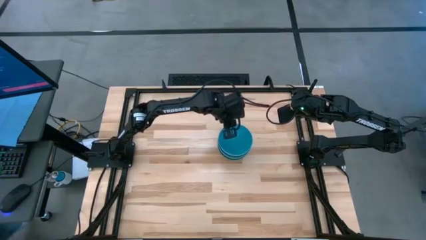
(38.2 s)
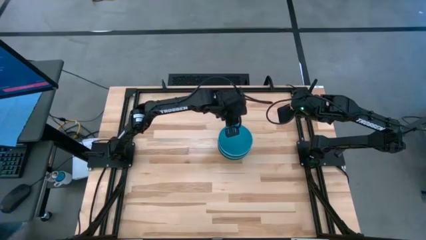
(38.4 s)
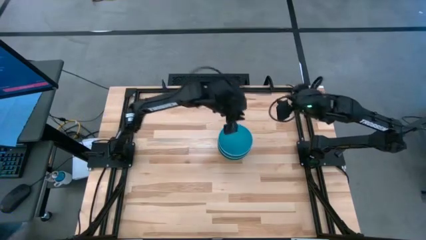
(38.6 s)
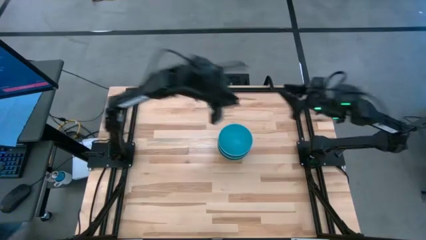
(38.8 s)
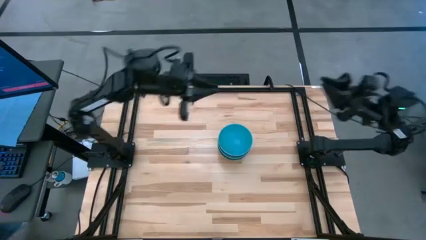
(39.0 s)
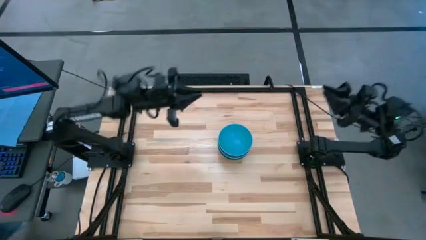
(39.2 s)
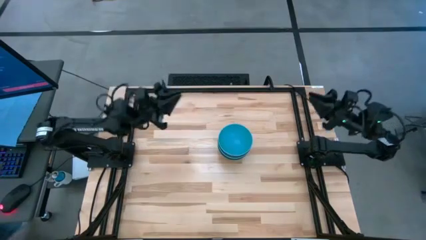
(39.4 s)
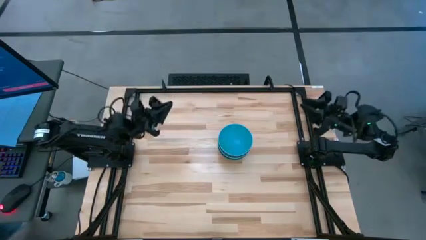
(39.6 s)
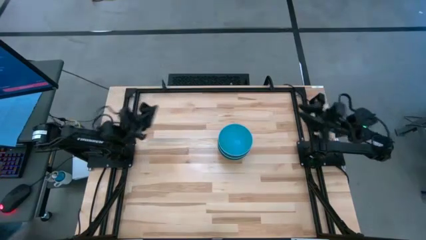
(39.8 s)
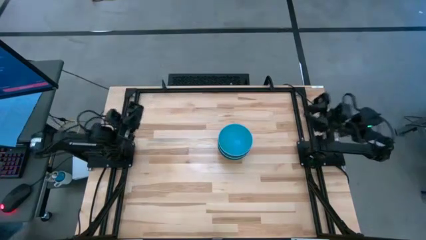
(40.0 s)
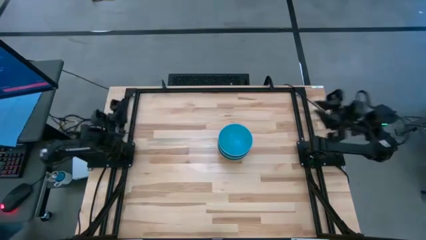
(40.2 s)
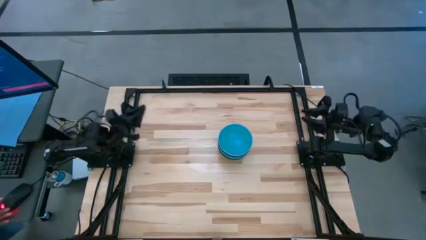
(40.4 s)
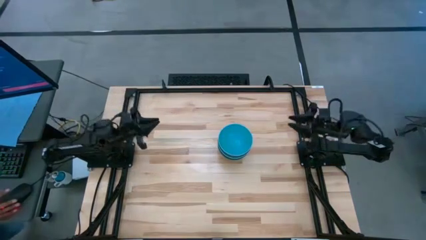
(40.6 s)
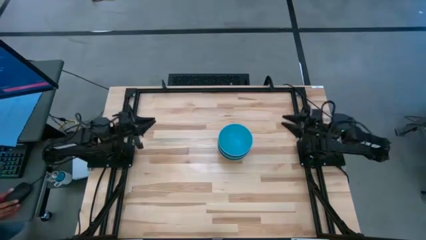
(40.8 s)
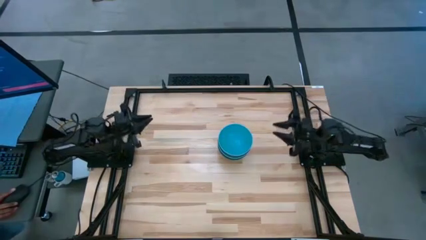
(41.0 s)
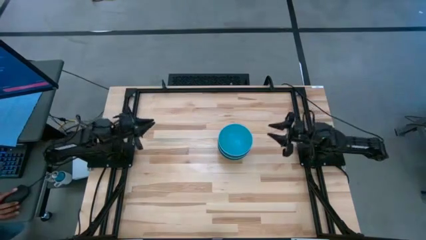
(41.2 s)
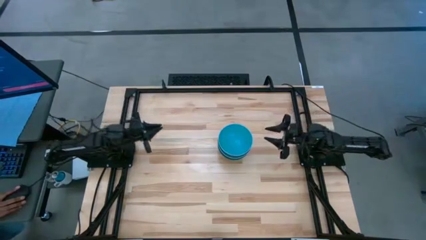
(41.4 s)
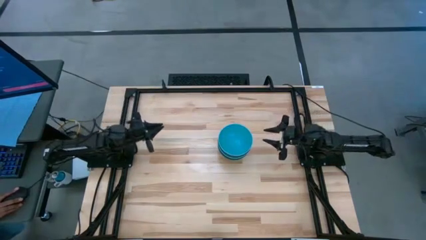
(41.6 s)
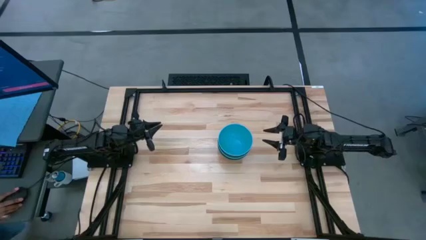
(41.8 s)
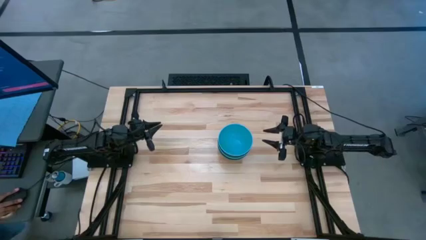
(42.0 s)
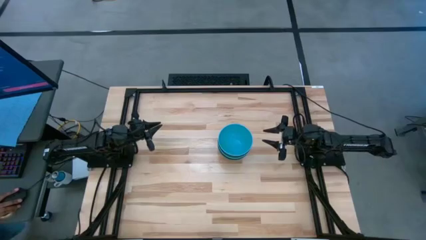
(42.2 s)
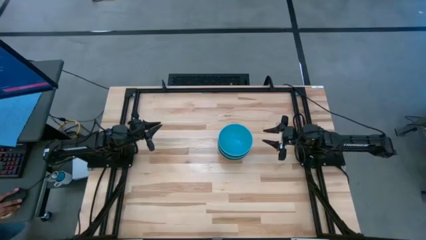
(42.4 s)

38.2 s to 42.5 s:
Task: Nest bowls inside each other
Return to Home Position

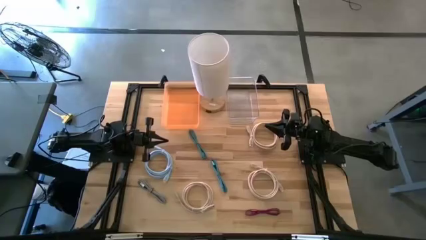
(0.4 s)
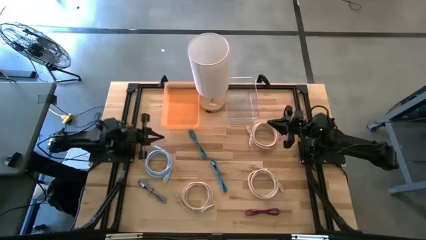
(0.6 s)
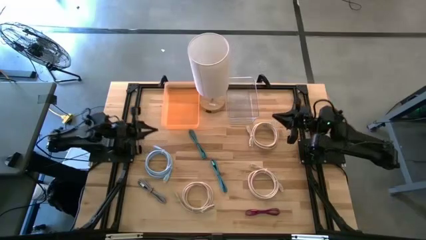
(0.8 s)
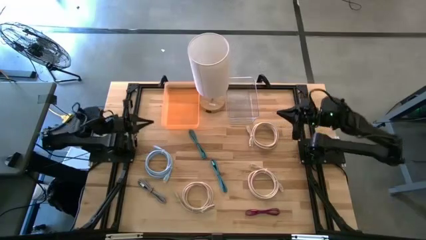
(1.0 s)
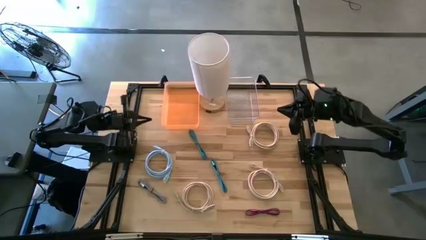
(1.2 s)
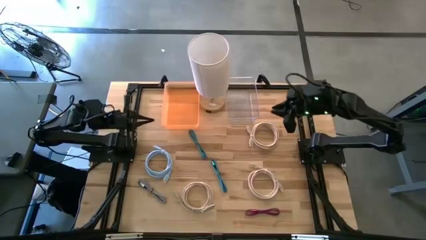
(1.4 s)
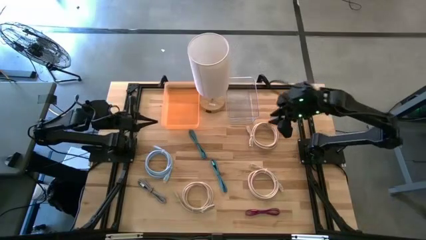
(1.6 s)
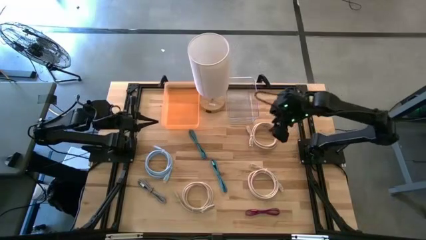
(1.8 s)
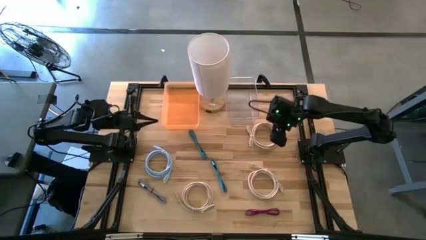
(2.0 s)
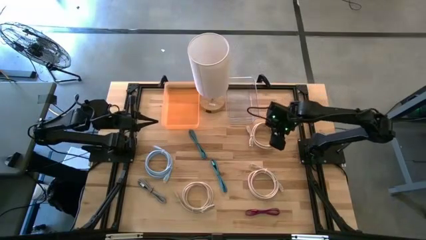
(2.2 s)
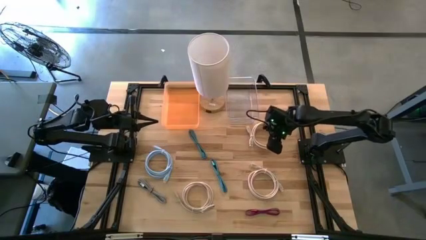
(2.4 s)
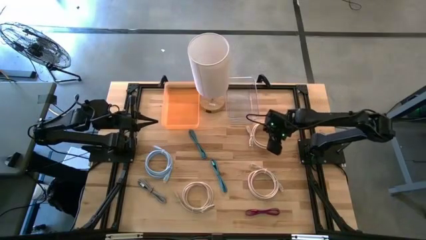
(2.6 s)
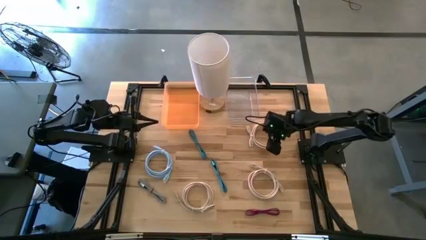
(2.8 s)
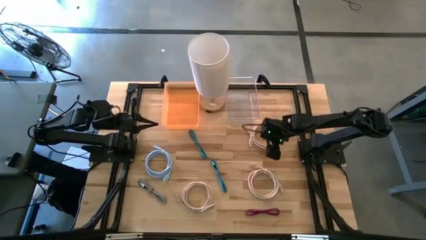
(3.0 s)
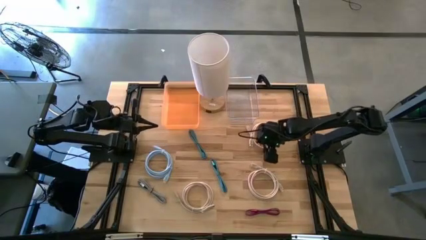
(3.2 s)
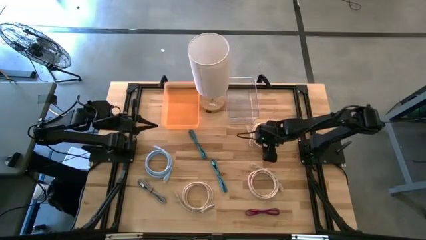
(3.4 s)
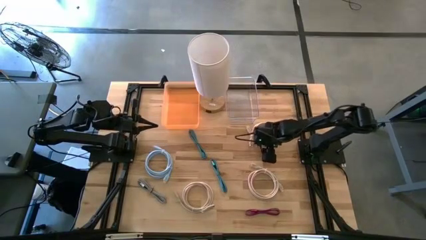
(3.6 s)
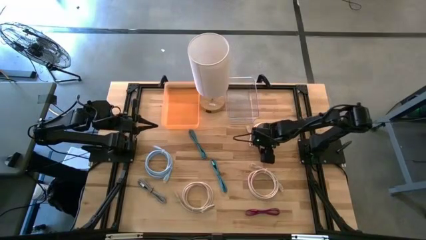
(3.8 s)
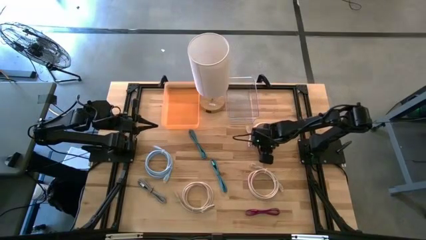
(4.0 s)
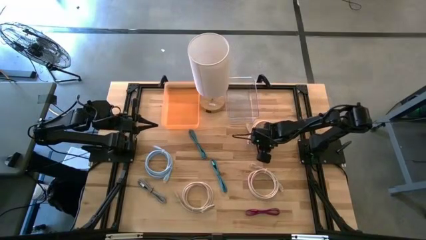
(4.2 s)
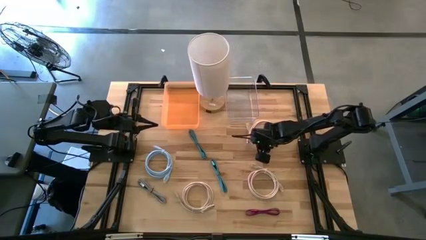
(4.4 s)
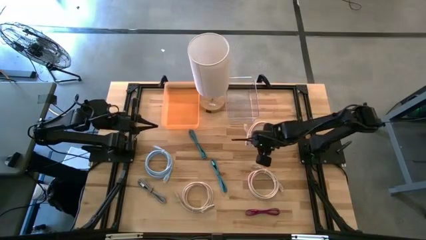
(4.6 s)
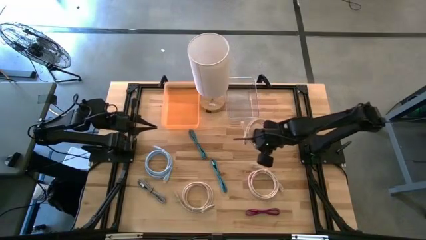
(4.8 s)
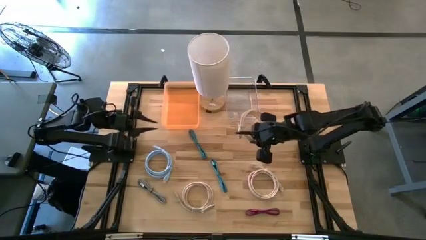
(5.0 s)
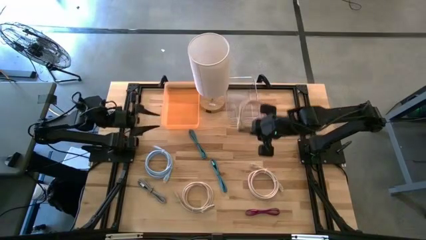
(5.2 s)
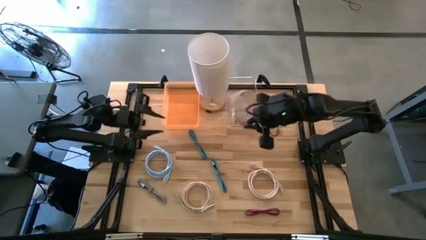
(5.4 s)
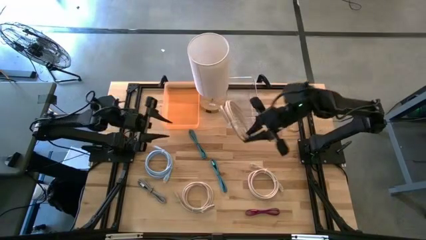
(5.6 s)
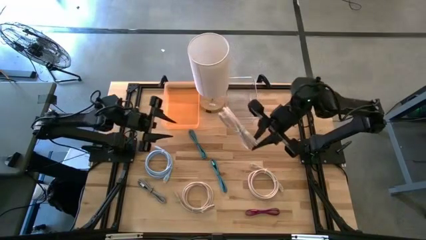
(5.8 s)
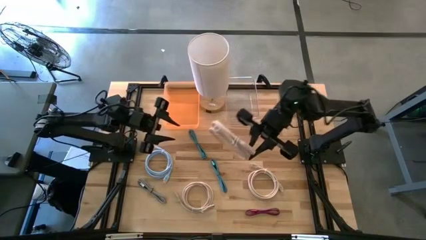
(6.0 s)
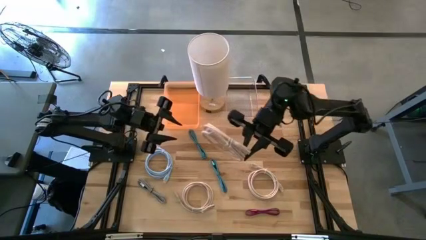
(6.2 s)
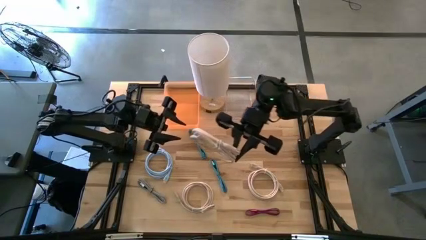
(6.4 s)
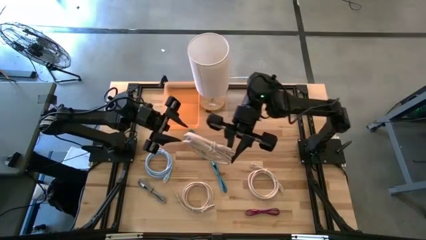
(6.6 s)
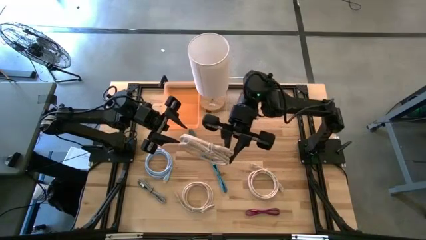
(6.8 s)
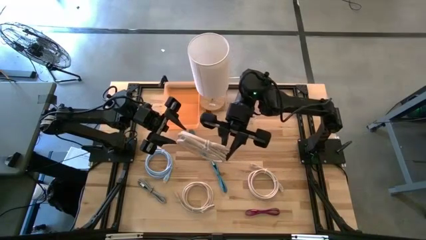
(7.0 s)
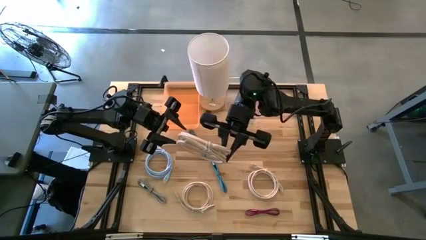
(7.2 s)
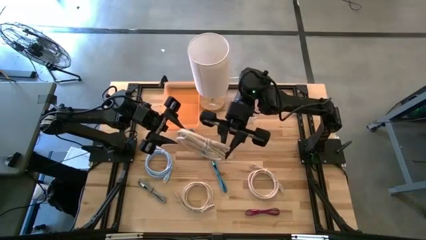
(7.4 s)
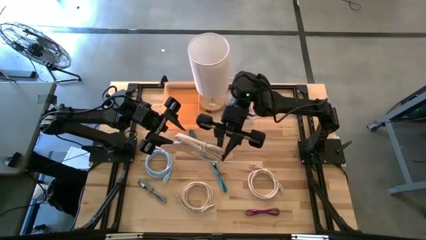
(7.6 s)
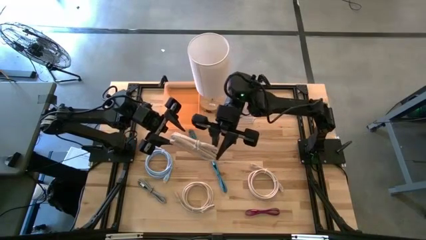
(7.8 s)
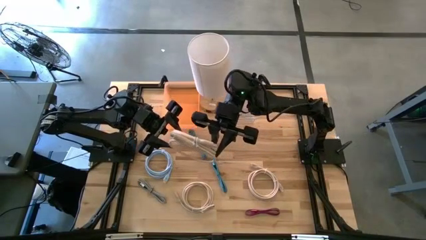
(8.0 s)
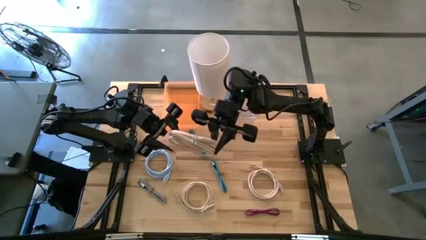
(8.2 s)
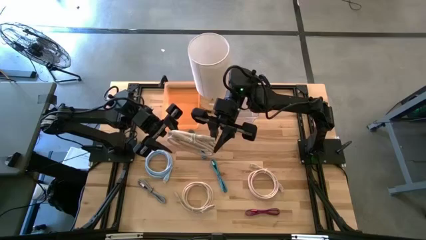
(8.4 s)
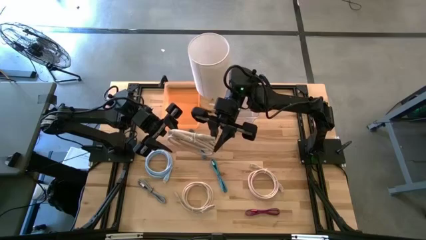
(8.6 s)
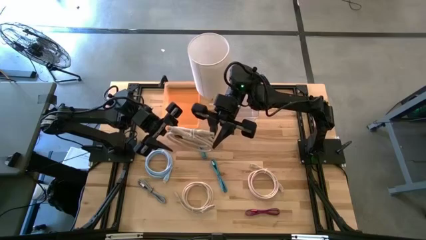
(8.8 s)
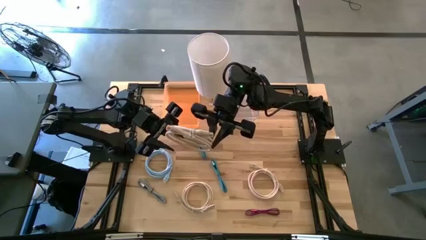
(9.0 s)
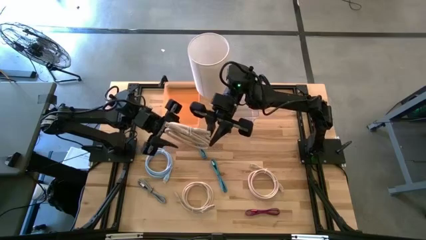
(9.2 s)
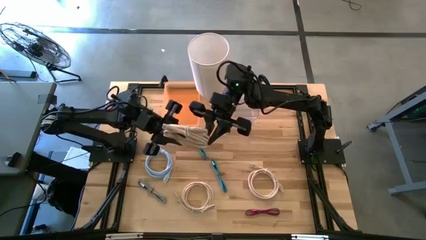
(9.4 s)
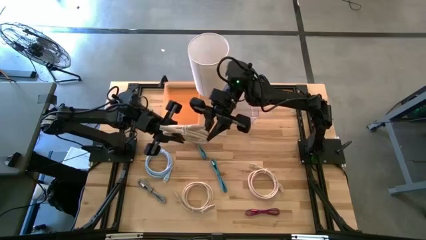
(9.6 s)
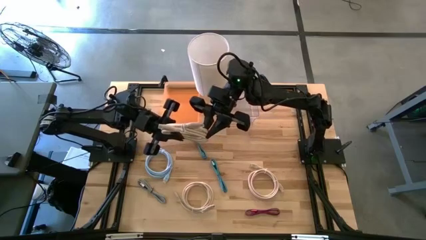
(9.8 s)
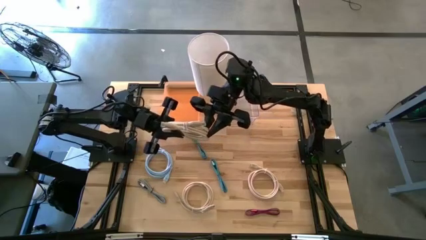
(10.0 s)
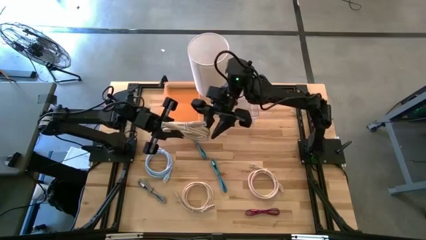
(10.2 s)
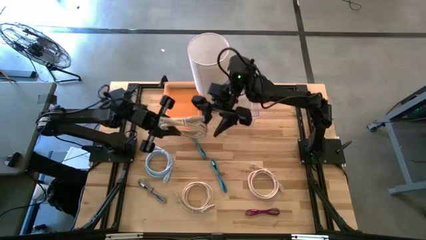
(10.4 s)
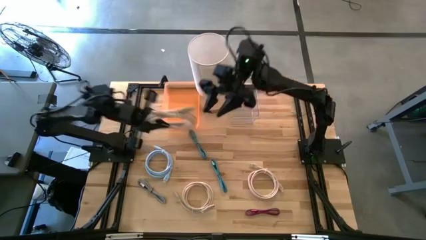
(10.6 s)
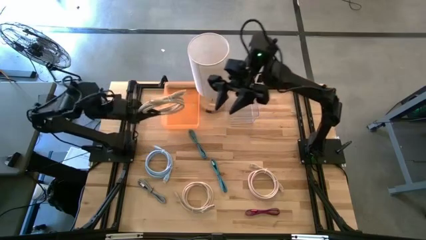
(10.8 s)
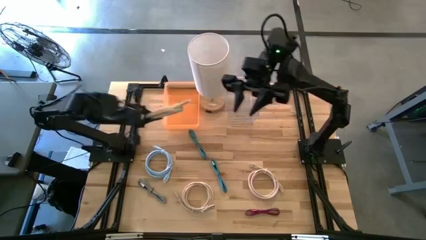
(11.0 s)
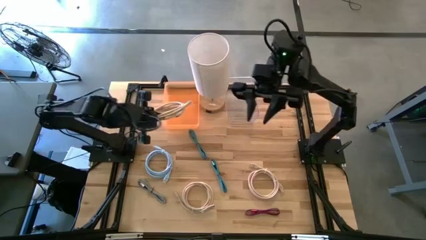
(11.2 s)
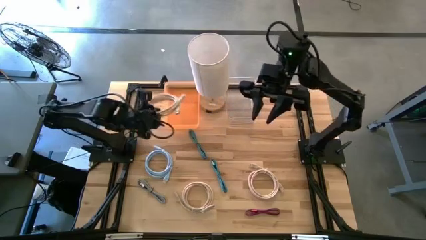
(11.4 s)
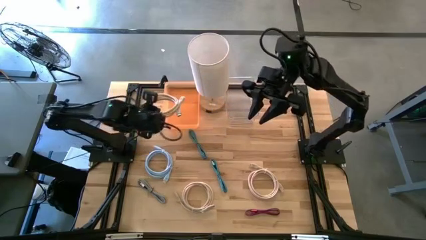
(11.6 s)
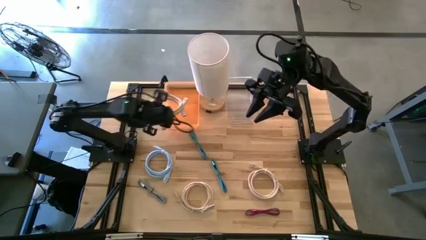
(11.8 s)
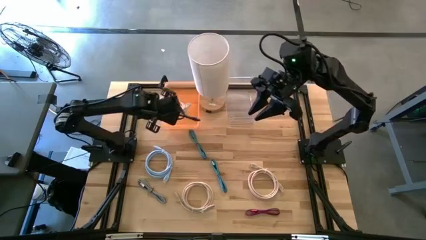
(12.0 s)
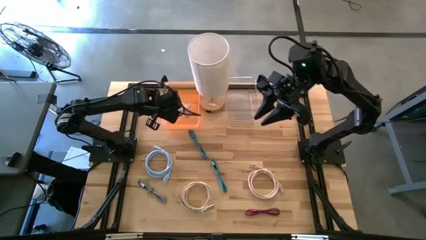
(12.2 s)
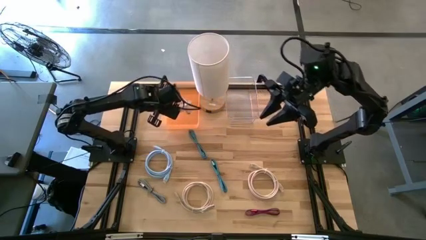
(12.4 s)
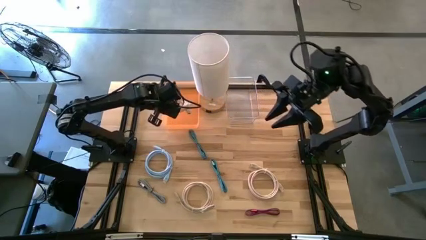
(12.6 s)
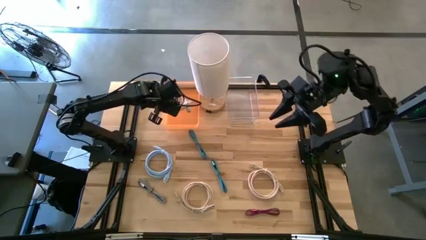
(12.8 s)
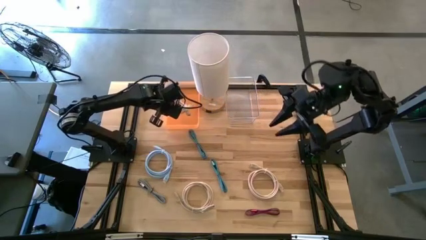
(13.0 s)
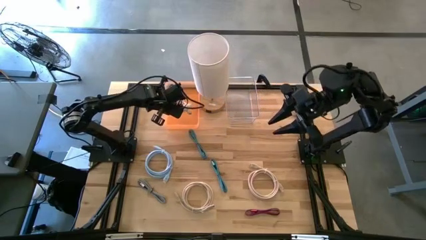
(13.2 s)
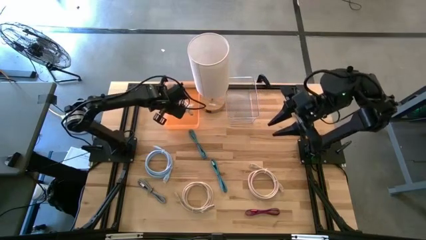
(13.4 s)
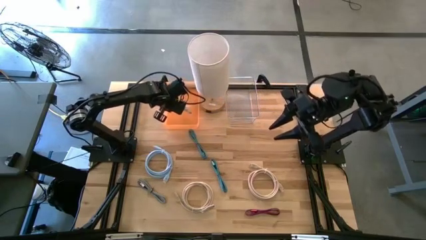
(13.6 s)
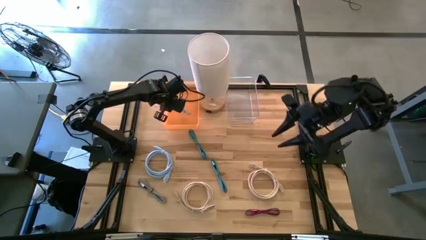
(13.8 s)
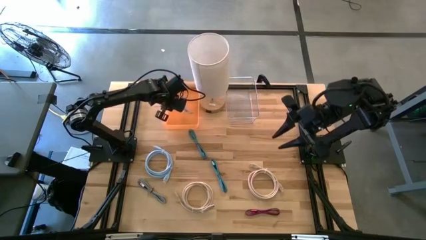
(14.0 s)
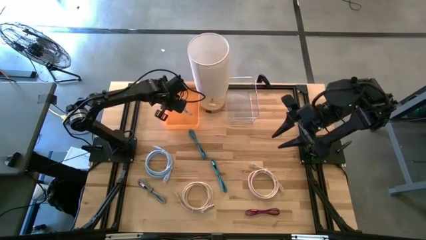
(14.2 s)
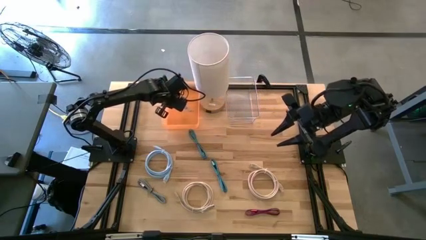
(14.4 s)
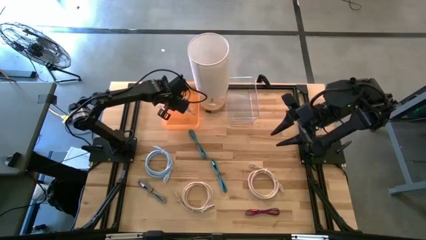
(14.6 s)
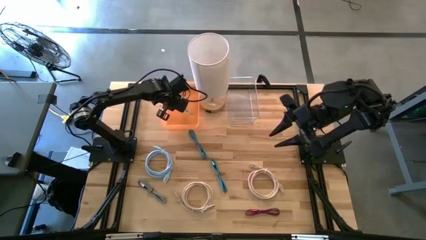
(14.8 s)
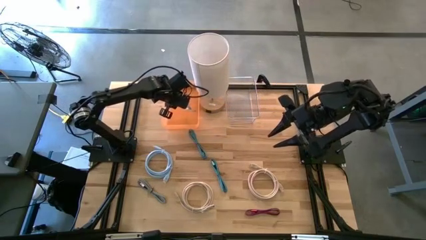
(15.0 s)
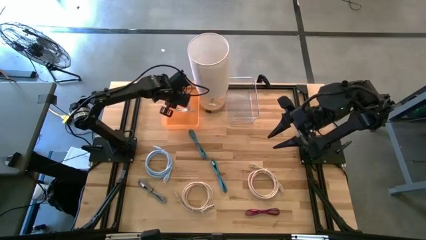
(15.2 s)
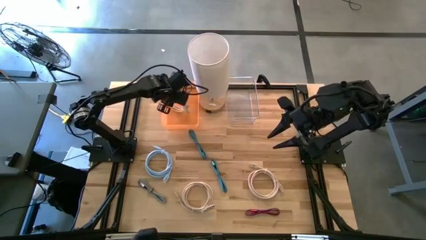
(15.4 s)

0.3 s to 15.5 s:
Task: Pick & Place USB Port
Put the top right white usb cable into the orange bin
